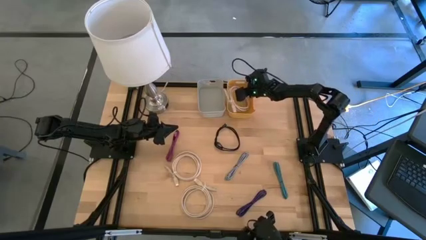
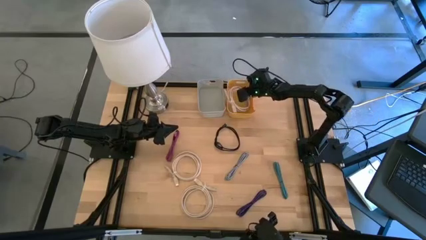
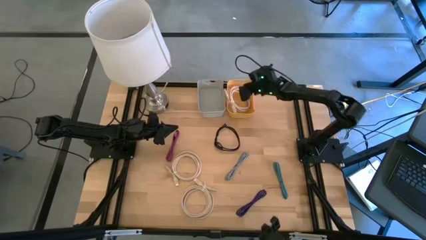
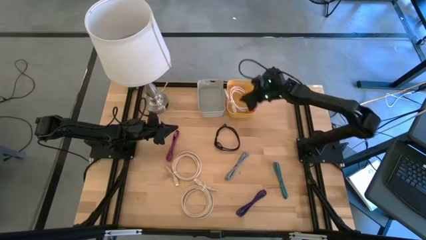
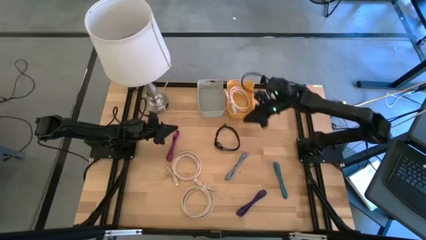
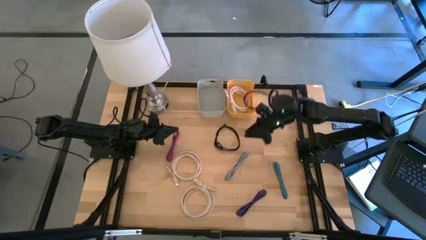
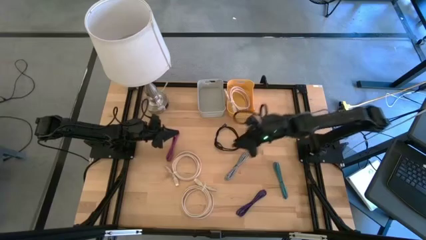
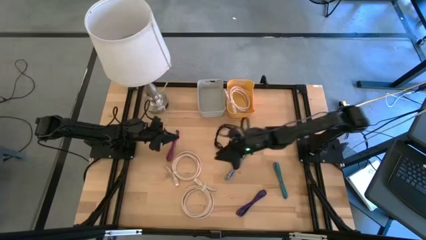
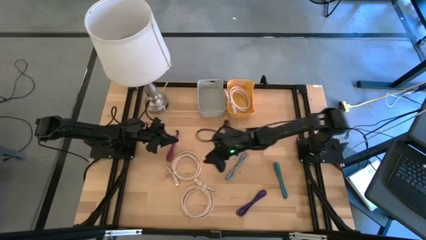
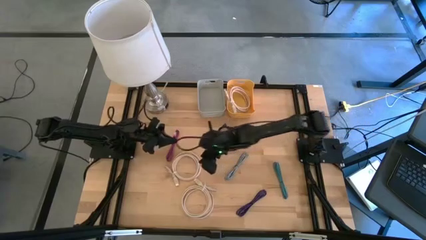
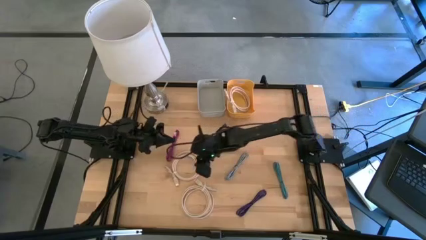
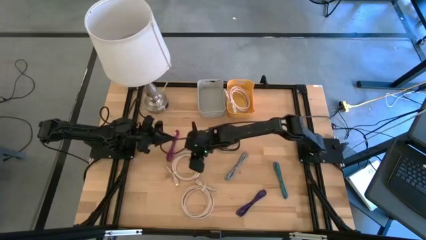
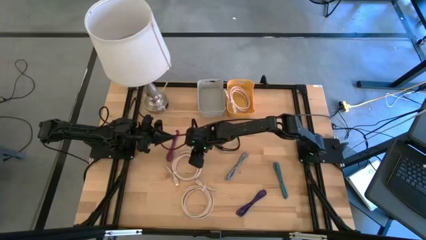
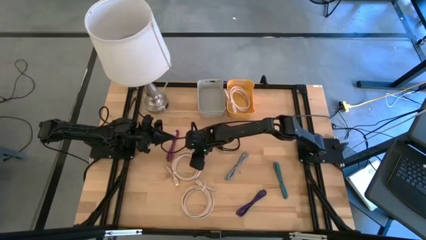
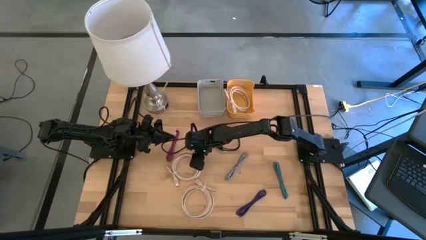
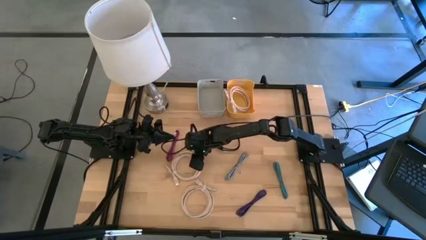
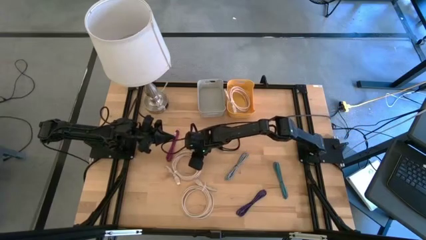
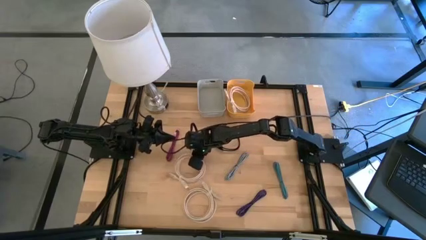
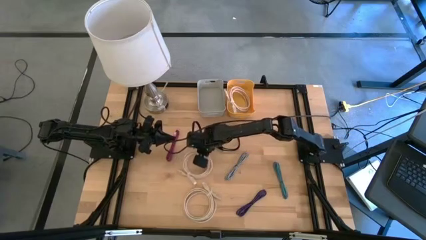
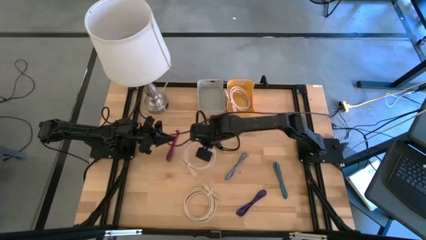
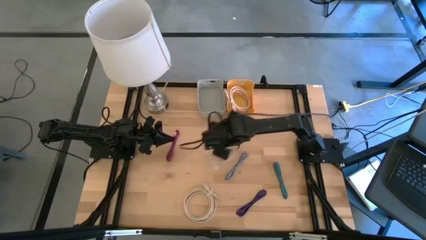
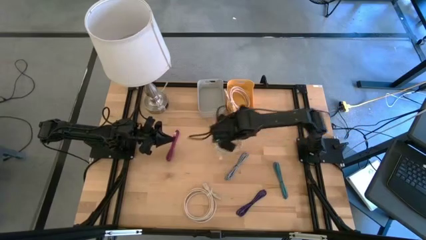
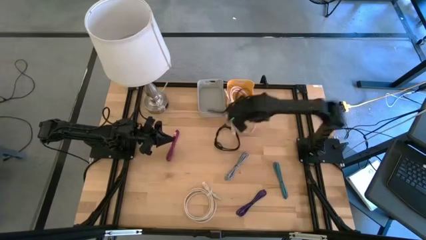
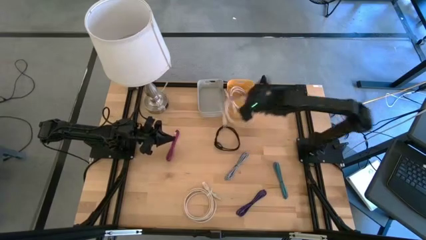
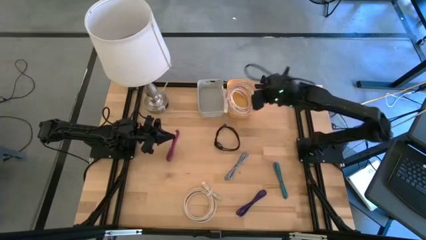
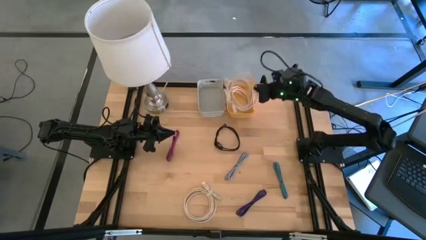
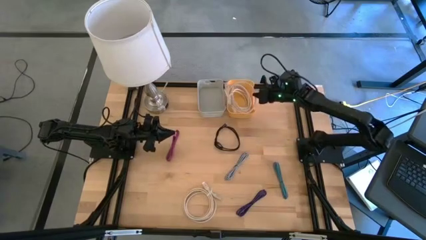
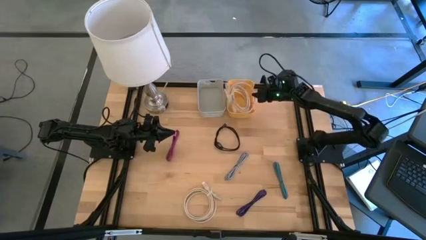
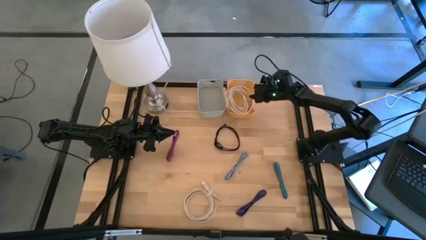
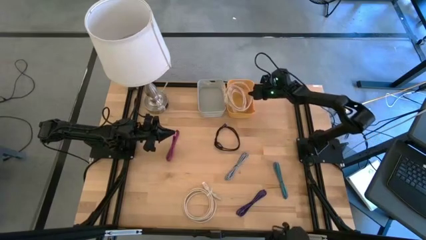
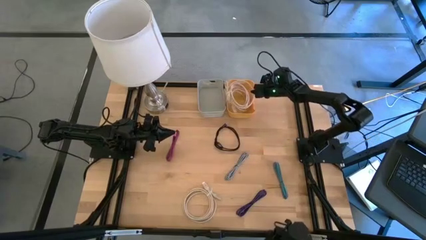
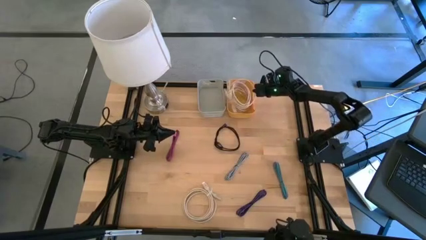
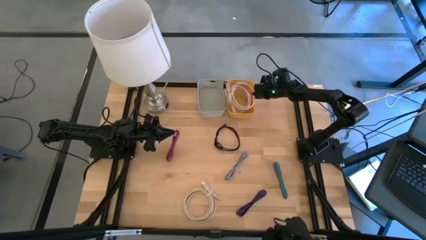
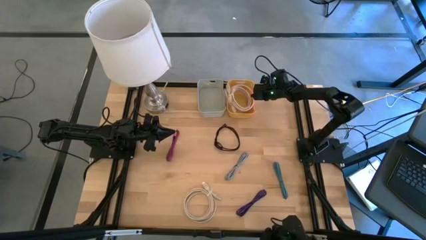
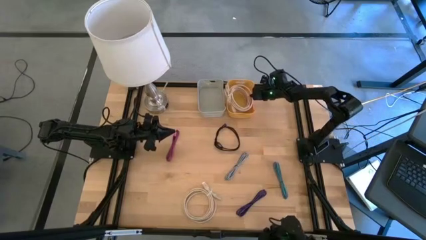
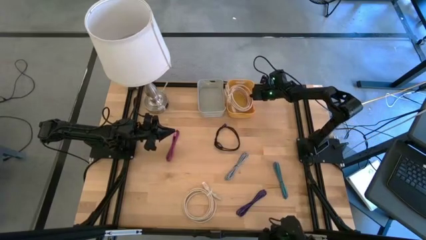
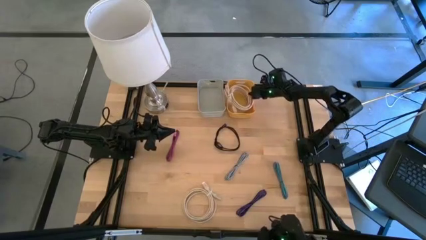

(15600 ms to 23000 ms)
Put the top white HDMI cable into the yellow bin

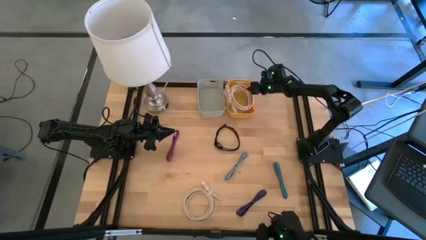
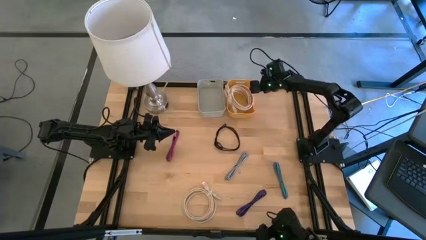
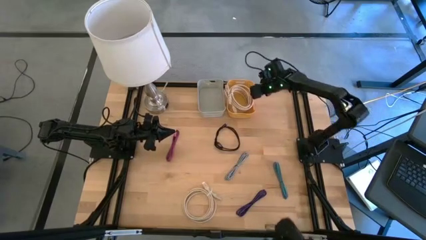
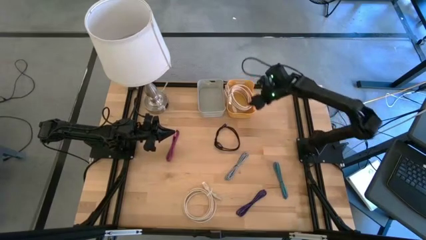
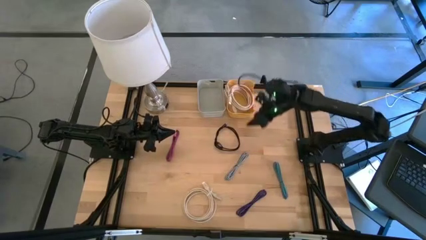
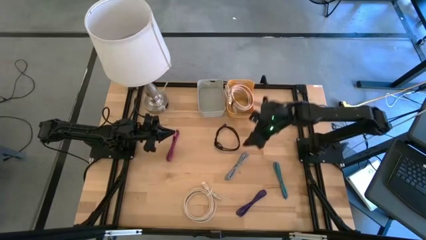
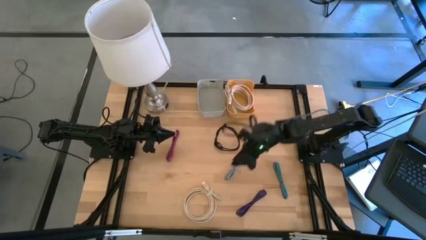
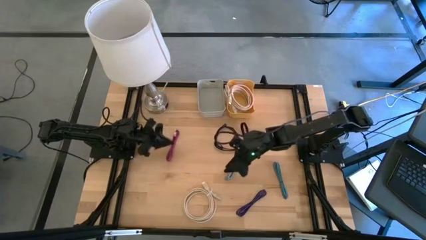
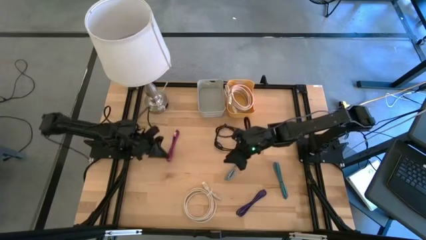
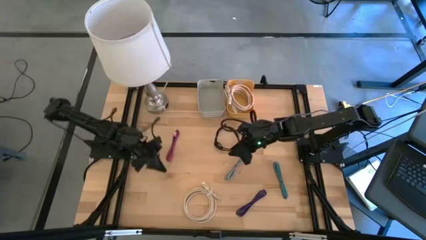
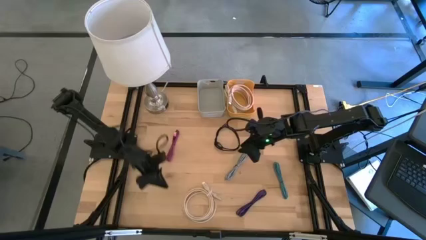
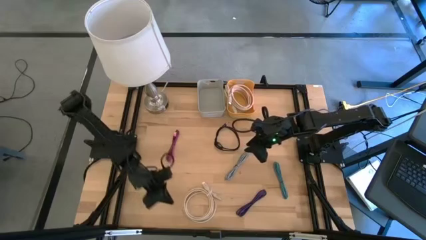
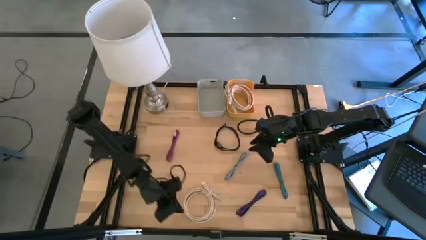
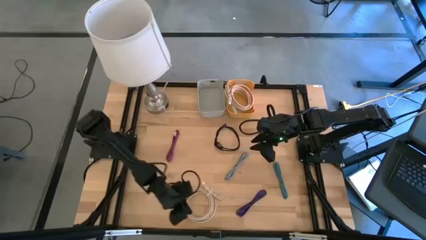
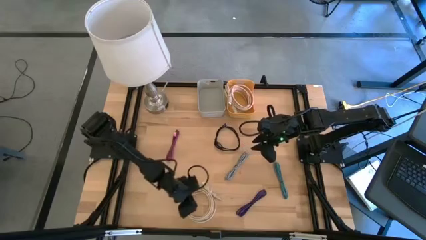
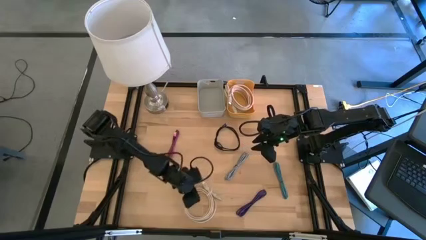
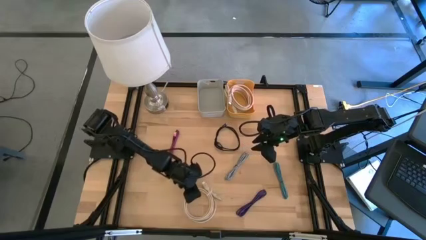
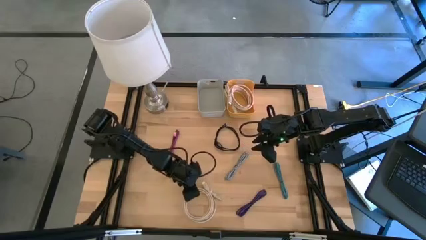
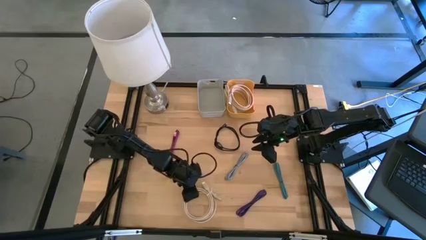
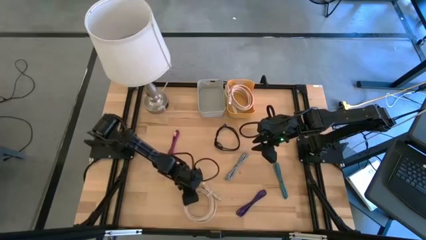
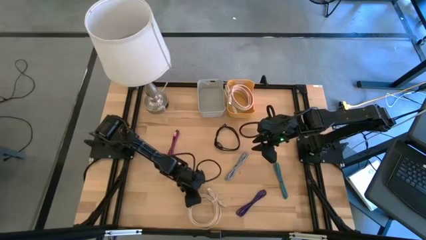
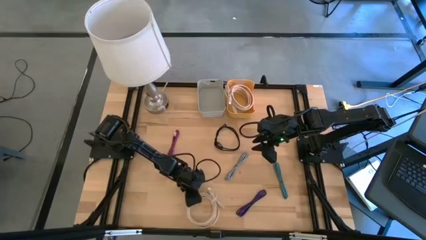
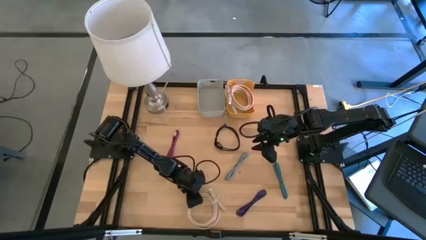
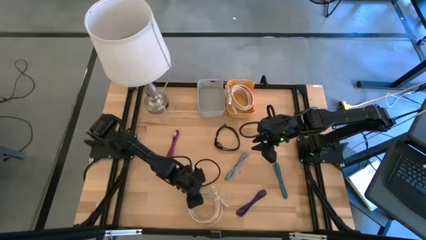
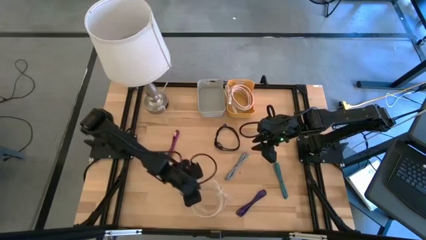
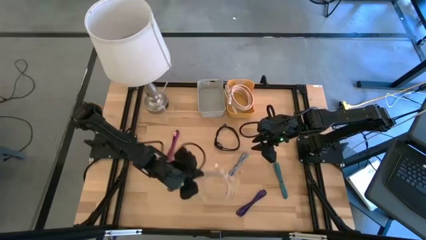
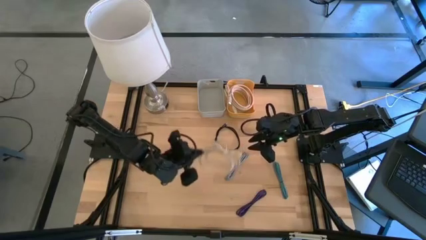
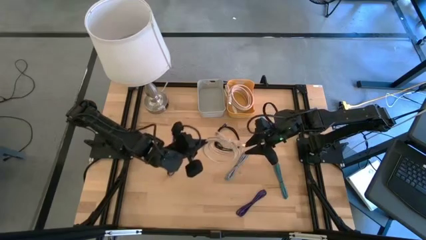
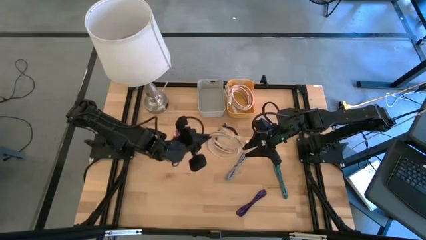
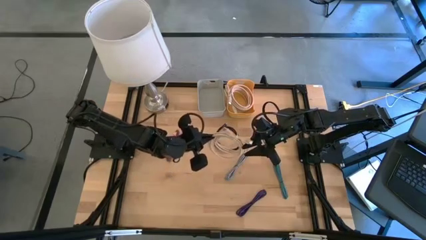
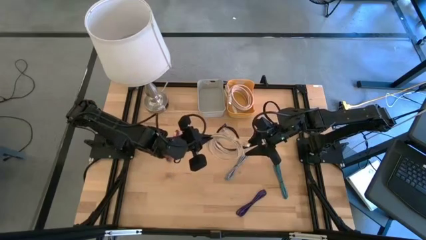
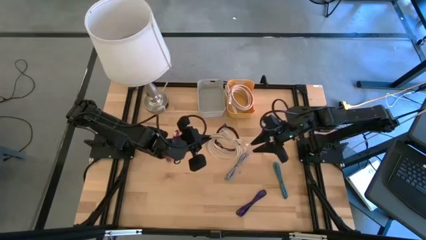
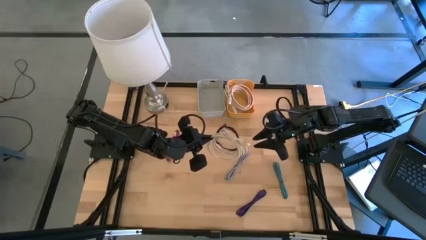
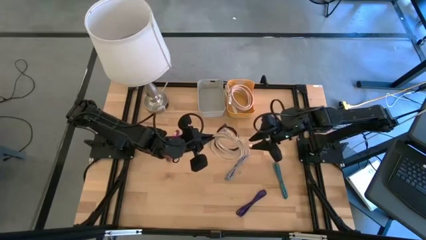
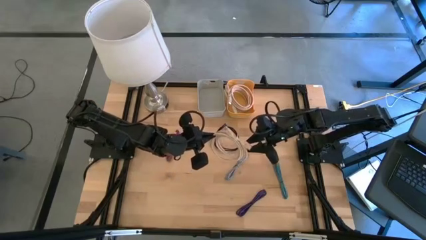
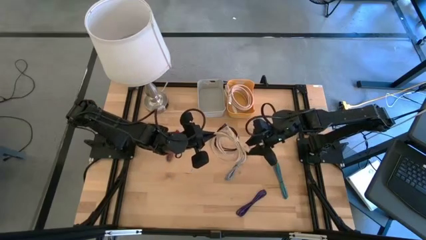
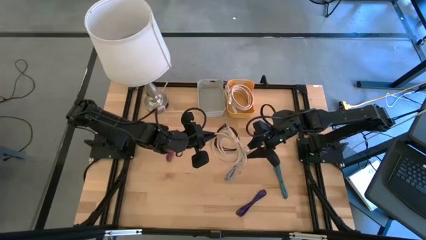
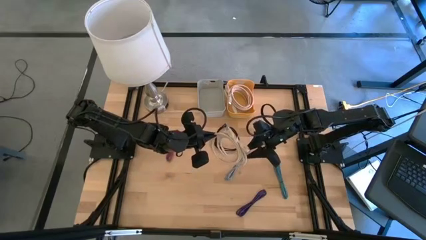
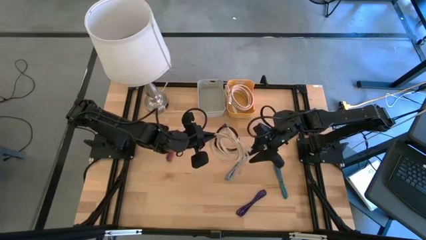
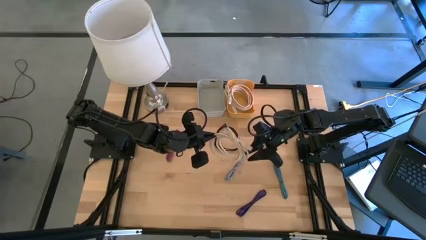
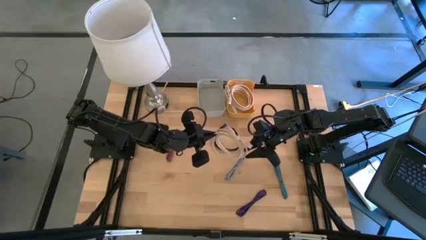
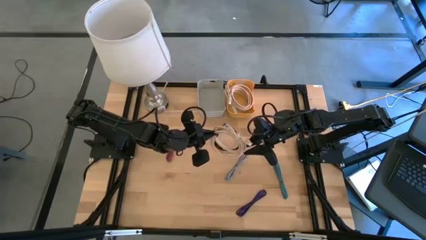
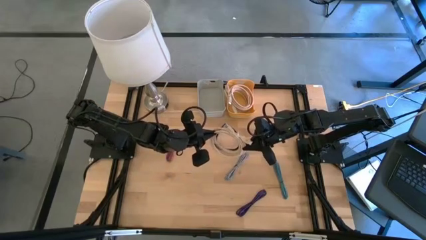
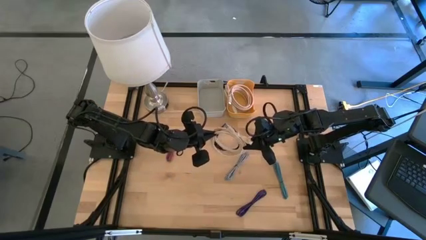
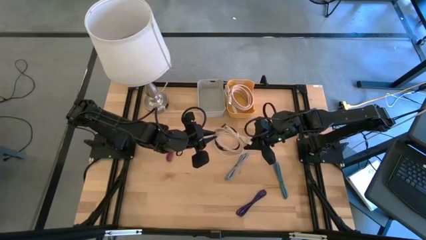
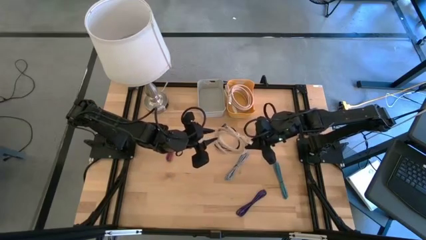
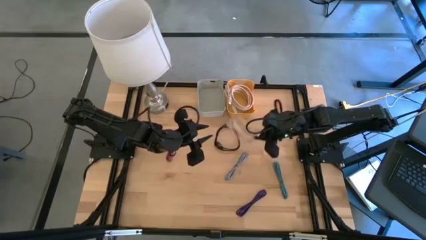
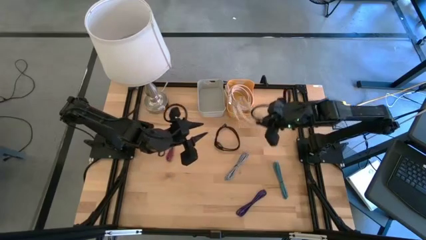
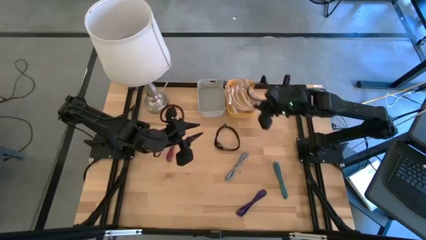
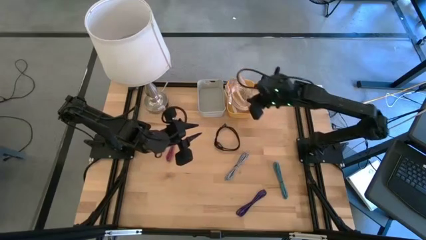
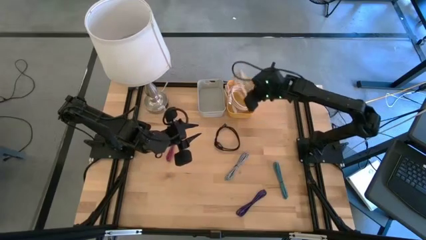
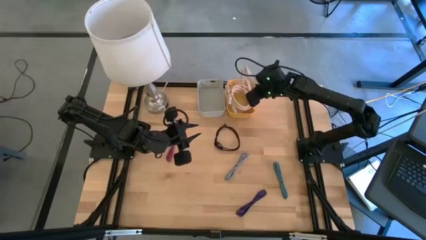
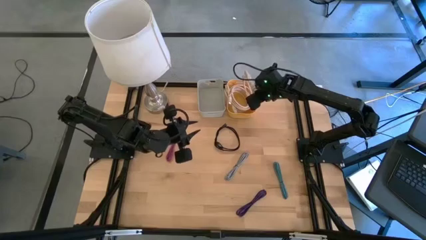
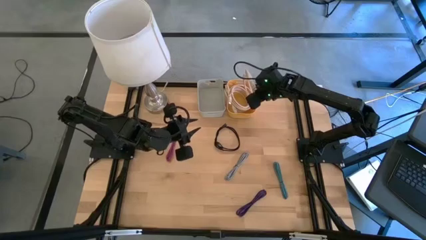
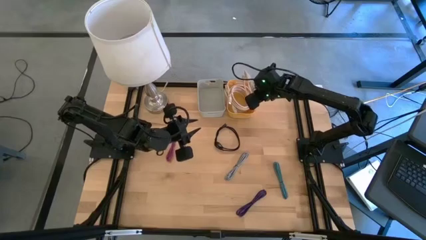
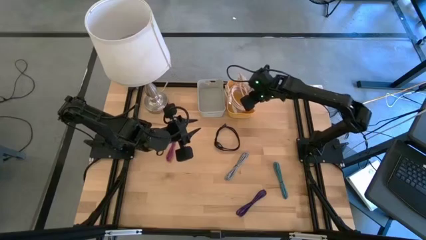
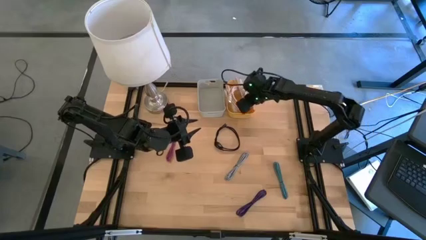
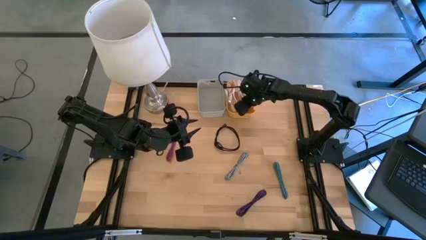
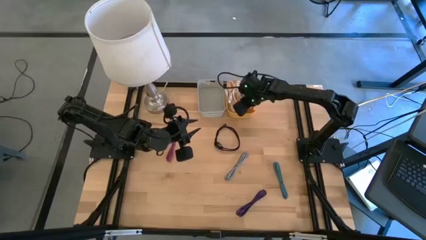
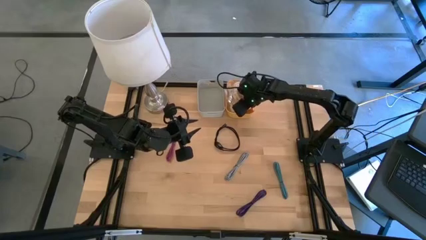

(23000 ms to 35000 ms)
Put the white HDMI cable into the yellow bin
